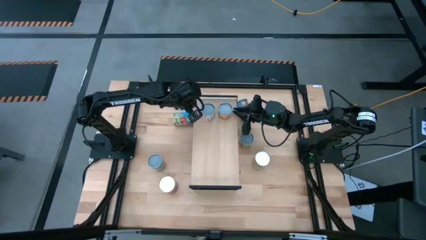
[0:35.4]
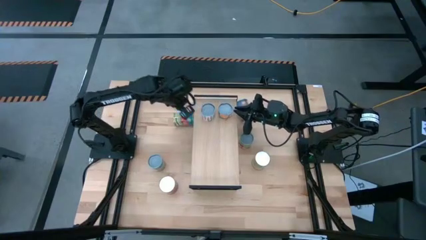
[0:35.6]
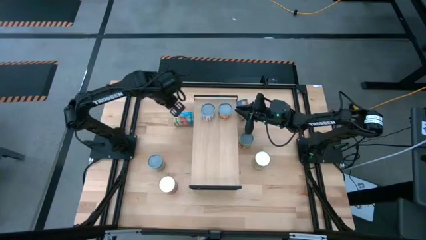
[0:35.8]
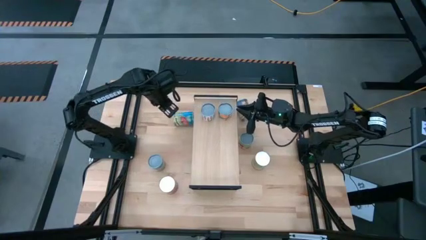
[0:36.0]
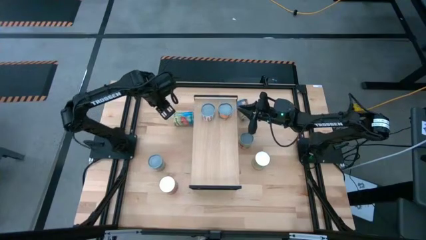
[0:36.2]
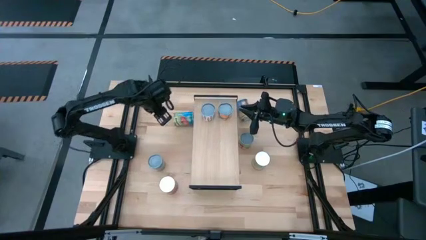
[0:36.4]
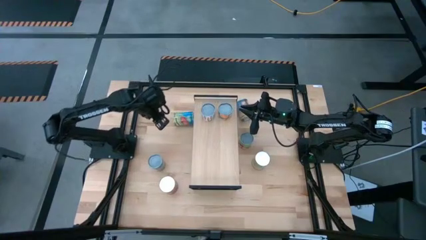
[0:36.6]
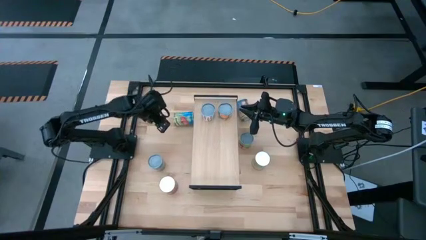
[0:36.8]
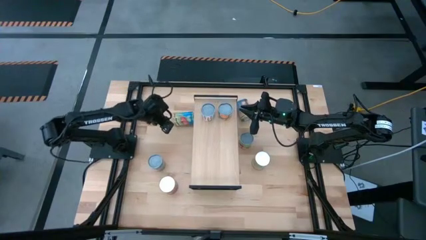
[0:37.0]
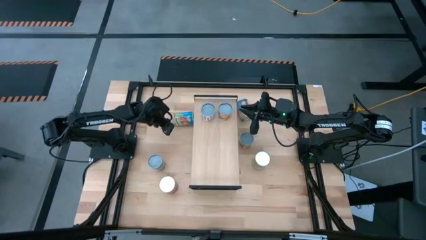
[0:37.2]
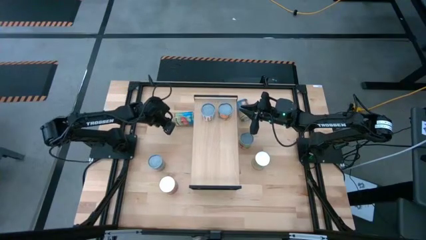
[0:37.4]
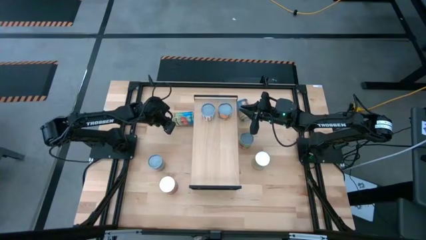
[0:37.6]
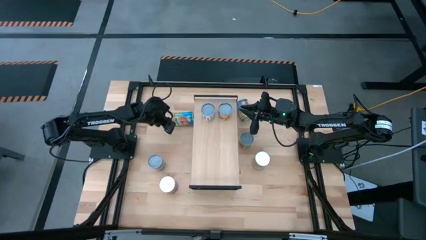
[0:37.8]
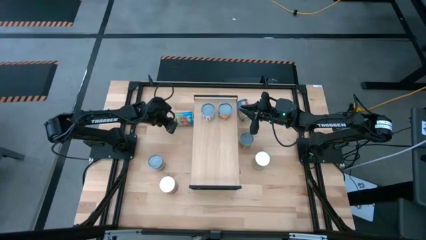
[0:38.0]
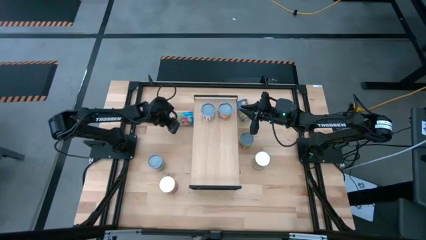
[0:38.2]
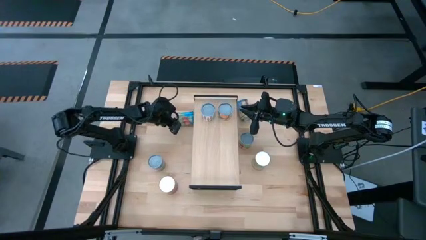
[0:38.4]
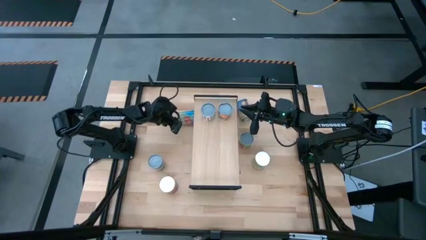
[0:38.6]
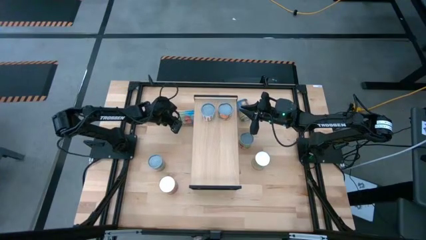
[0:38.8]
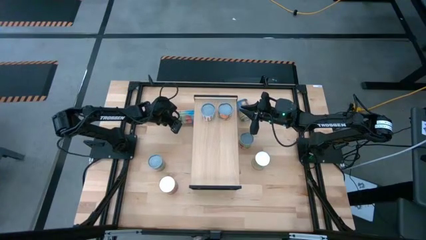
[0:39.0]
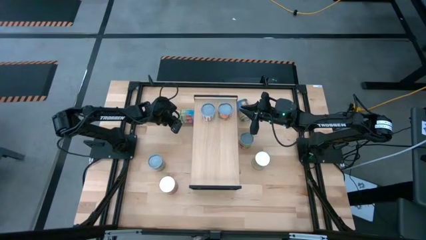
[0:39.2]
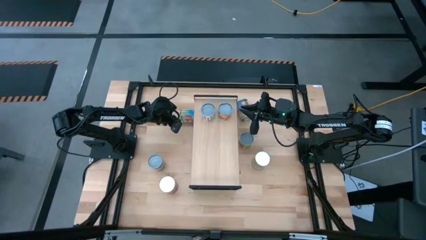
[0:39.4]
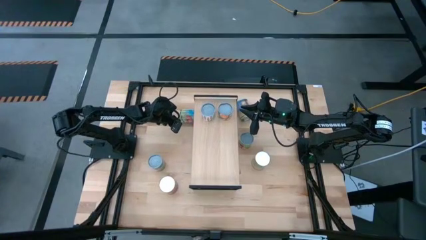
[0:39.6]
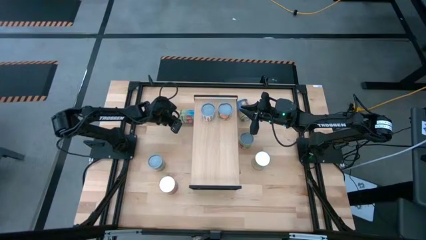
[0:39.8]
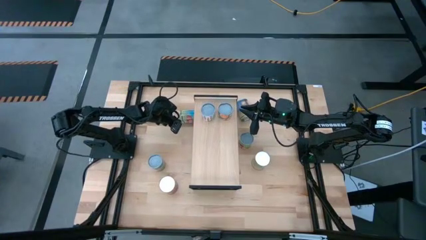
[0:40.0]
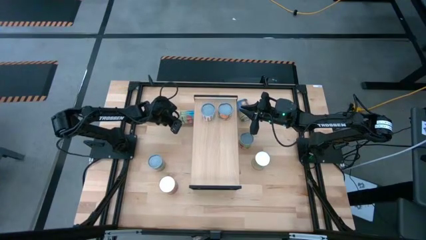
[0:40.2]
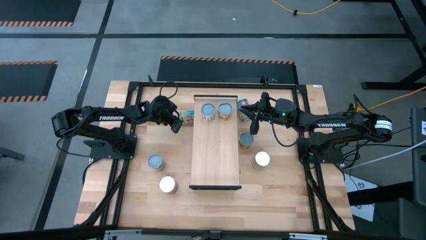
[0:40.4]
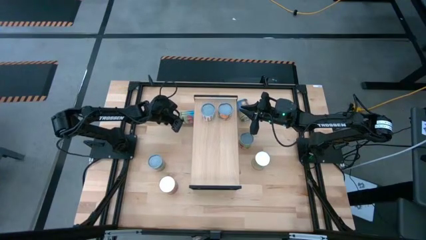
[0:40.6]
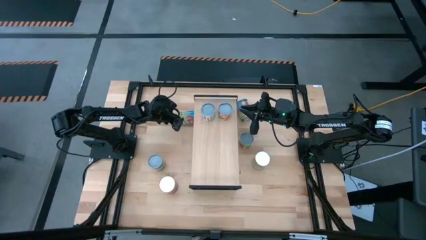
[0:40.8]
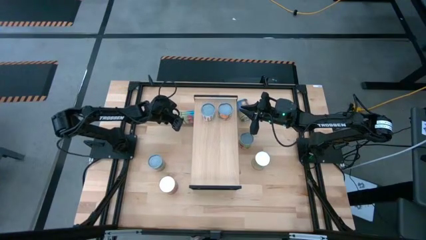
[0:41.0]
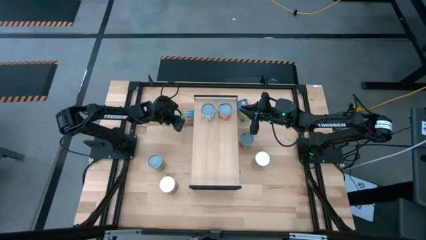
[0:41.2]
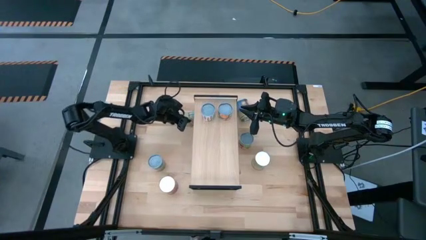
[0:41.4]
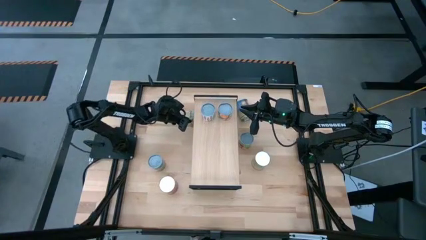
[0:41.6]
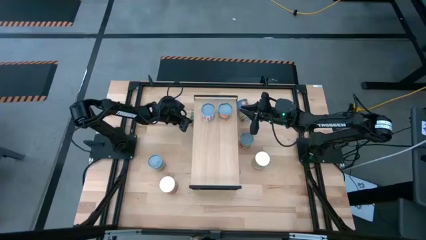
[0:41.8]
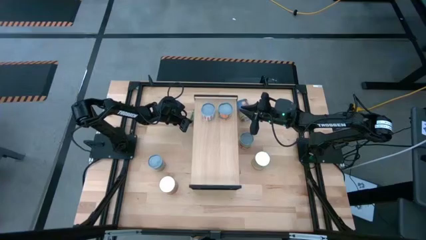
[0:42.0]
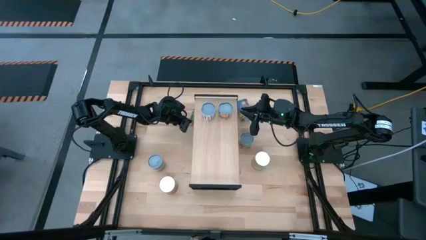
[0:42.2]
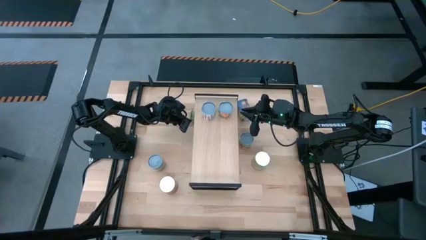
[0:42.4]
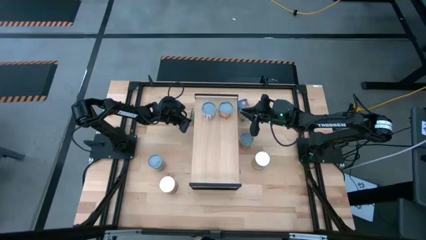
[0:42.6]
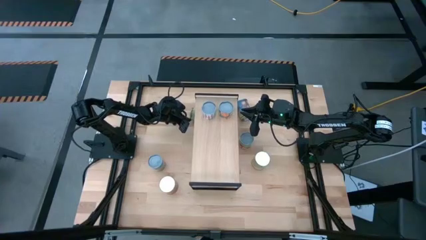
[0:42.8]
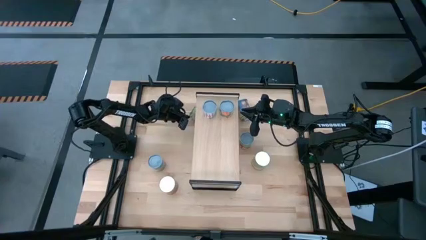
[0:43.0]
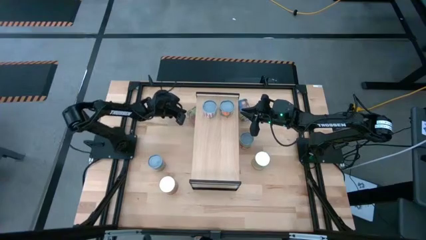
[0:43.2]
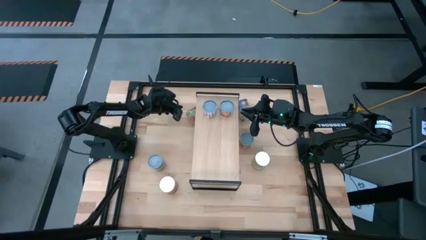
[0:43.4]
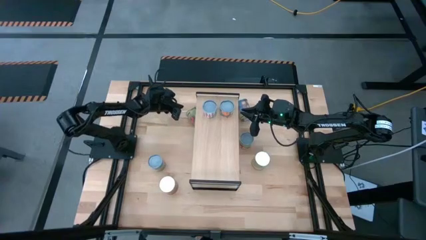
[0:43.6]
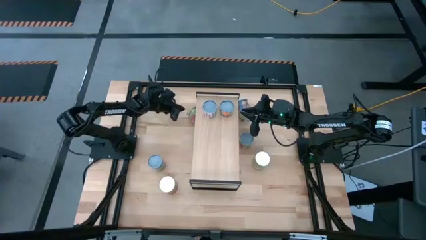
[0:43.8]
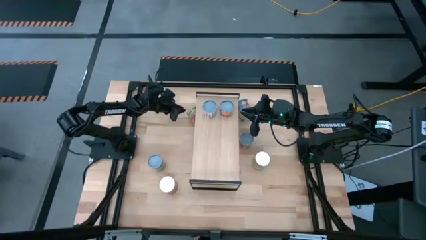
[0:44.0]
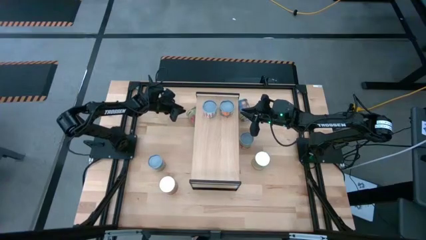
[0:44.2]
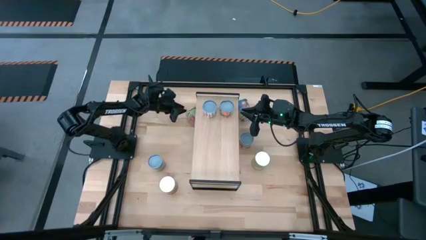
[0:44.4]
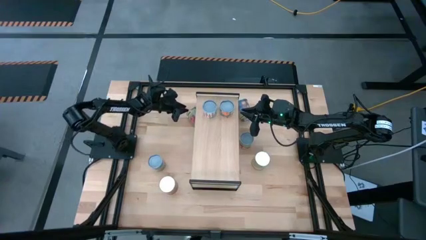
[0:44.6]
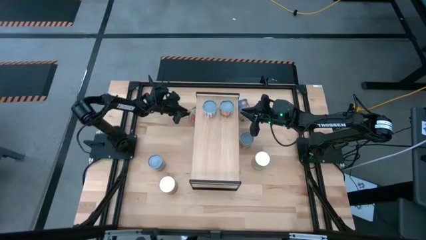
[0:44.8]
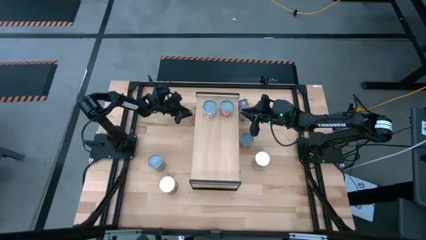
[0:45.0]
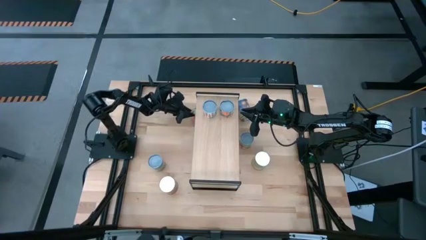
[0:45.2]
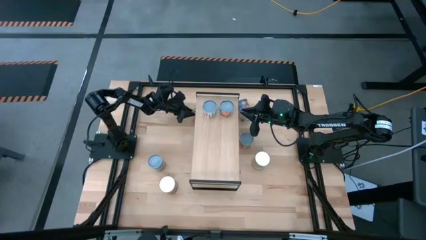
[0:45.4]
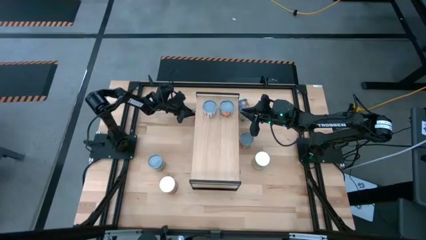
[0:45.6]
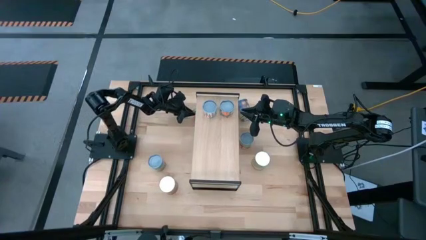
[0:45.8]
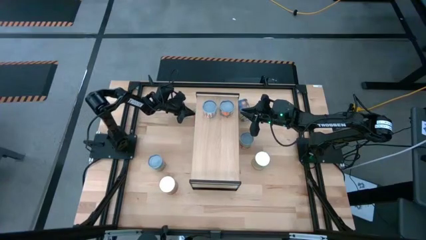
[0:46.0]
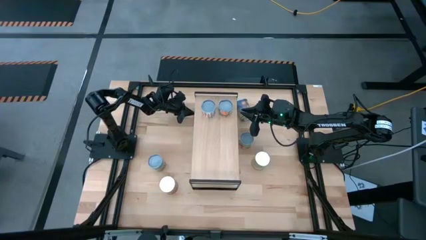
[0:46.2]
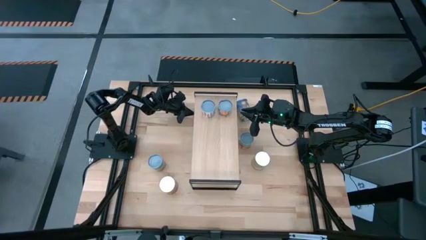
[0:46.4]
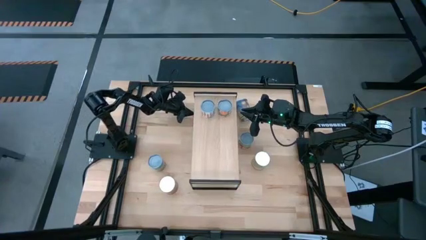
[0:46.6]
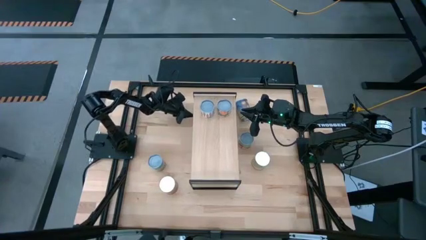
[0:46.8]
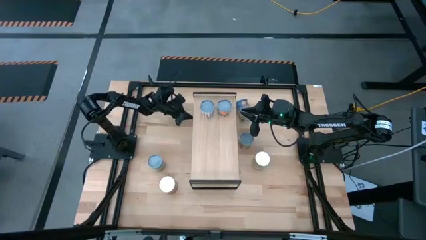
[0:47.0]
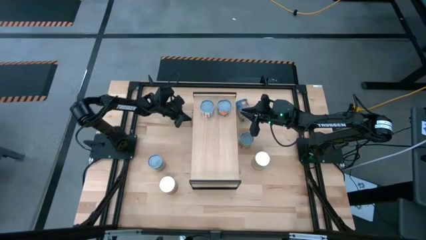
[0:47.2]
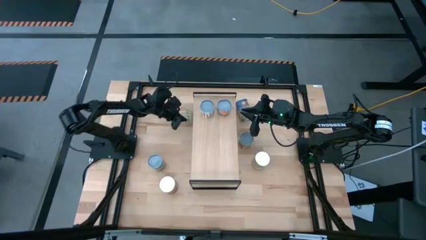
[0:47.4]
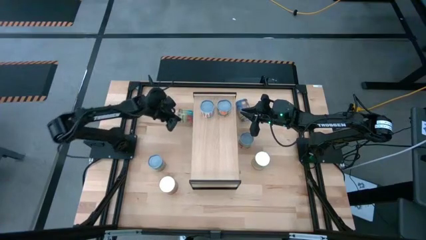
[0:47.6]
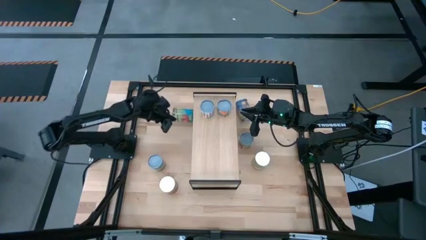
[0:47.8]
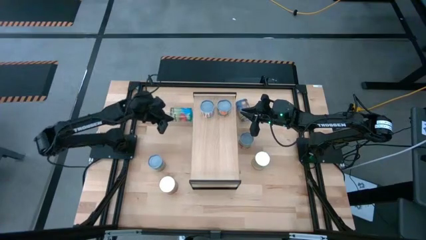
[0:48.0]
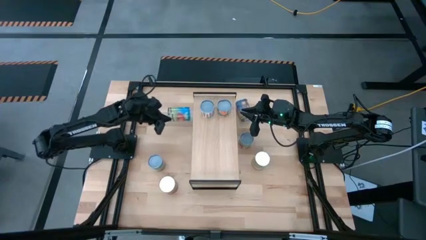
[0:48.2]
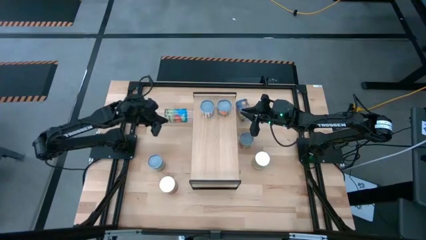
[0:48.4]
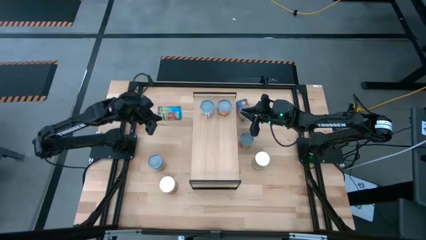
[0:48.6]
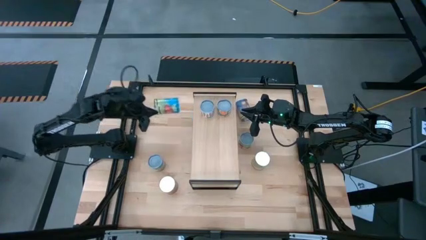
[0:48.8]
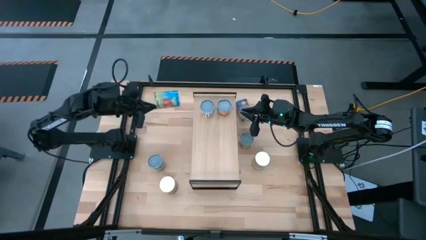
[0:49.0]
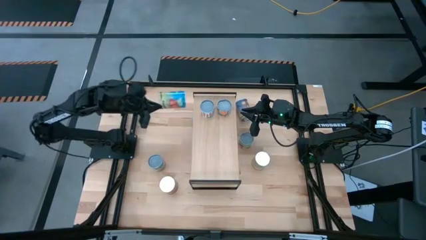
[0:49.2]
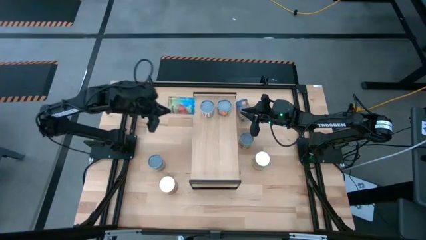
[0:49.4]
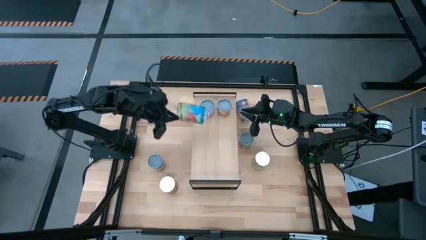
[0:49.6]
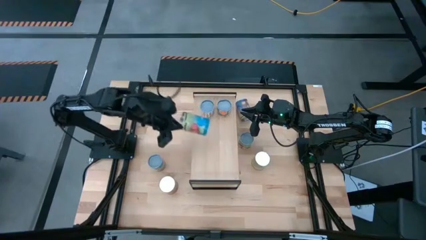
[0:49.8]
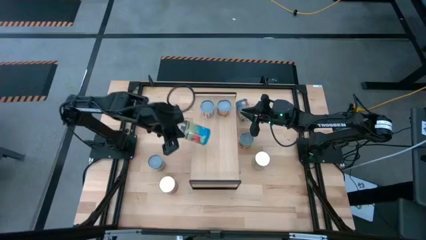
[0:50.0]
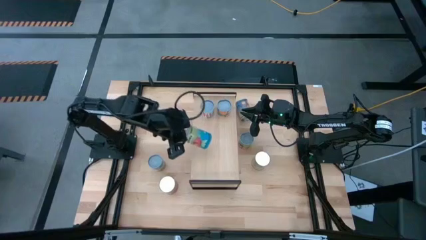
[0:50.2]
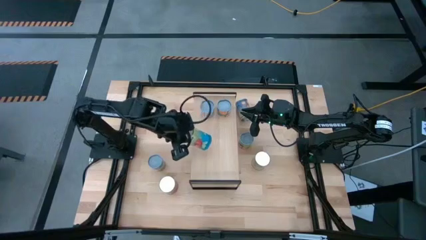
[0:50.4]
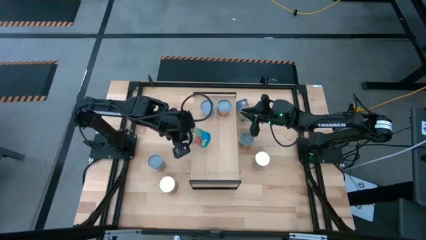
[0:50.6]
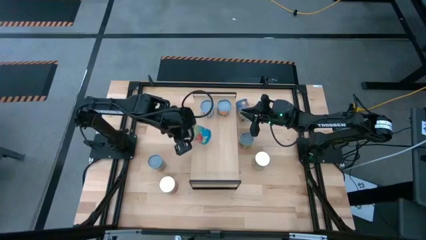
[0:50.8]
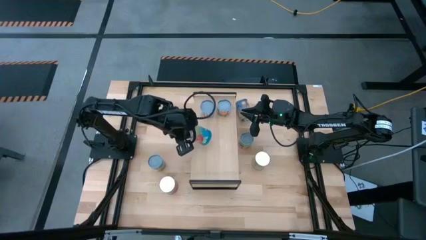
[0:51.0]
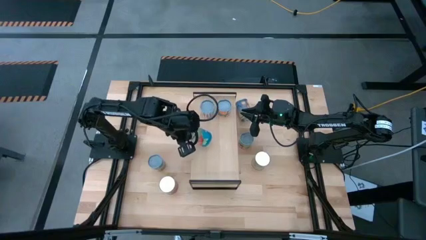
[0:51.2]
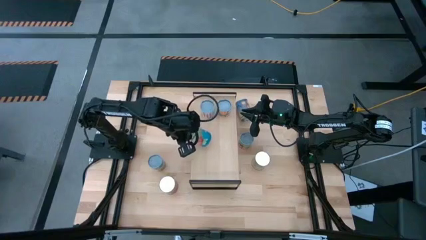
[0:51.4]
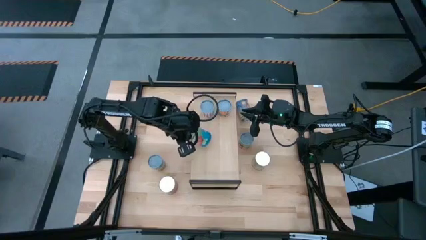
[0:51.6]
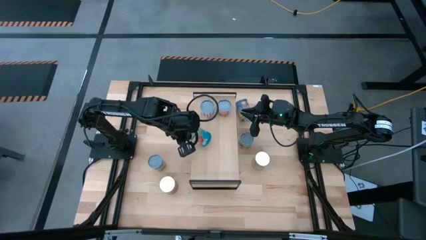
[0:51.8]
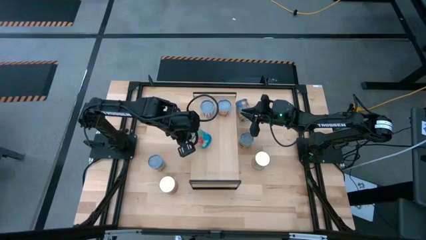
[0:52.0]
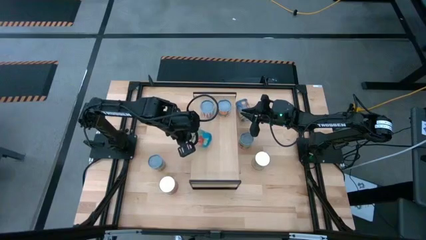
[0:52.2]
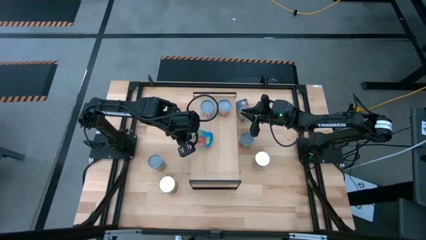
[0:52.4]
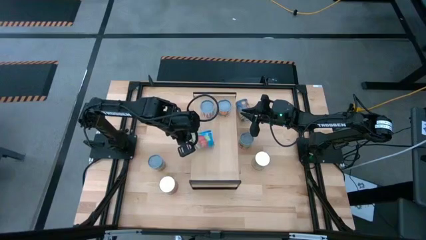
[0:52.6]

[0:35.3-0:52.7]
Task: Pick and place cans onto a shelf
Put the canned tomatoes on the shelf
